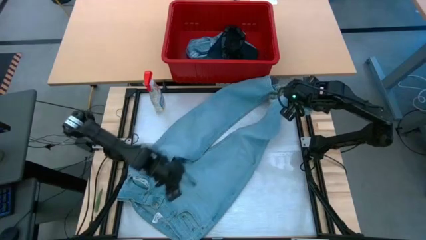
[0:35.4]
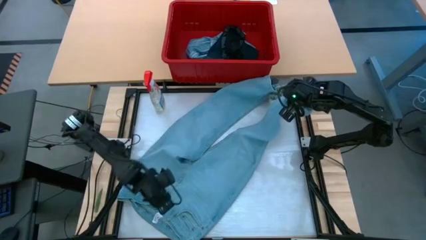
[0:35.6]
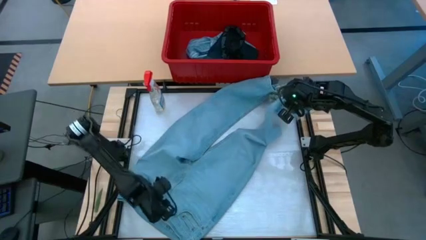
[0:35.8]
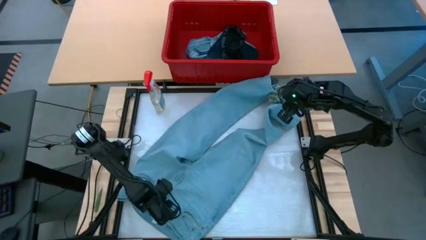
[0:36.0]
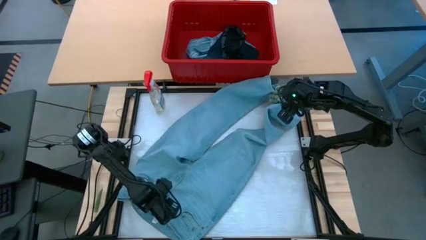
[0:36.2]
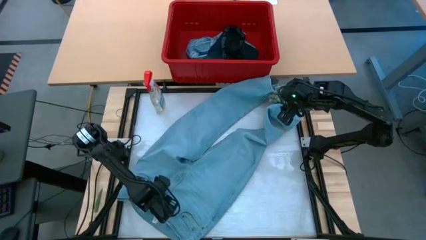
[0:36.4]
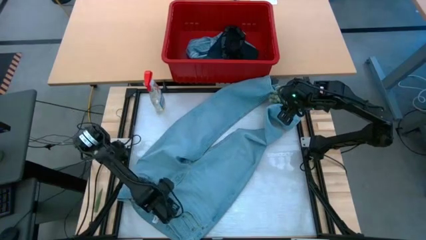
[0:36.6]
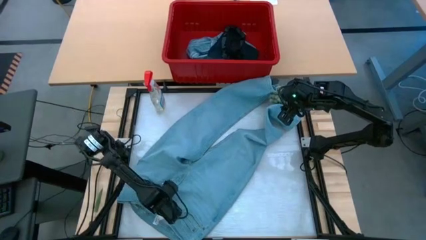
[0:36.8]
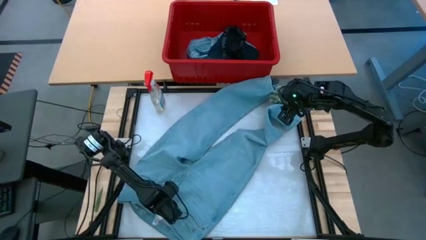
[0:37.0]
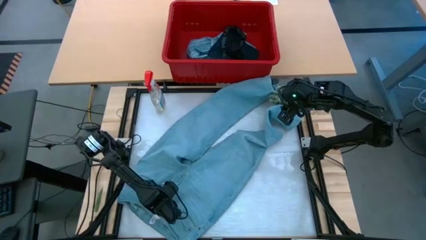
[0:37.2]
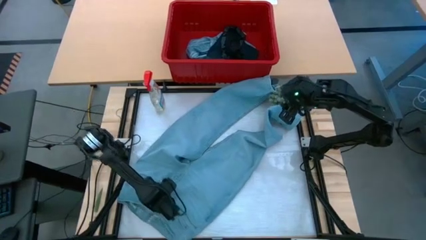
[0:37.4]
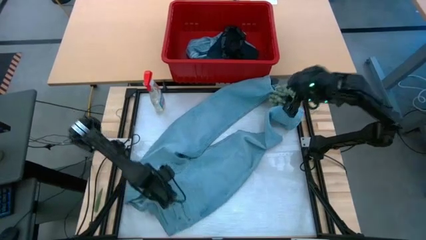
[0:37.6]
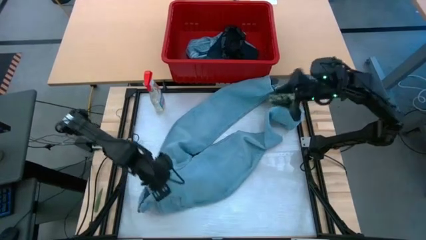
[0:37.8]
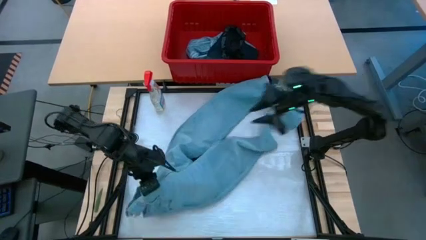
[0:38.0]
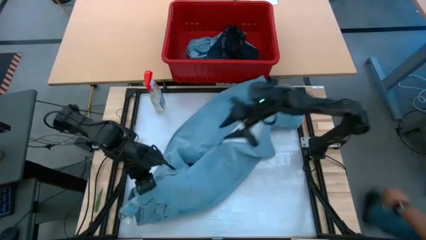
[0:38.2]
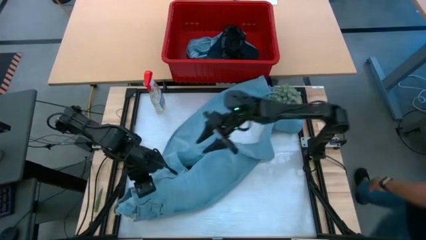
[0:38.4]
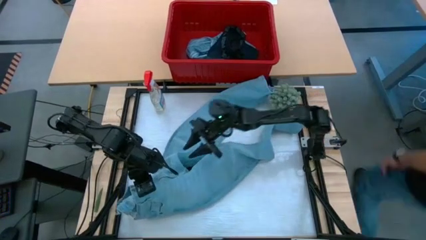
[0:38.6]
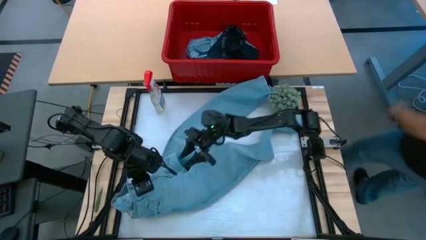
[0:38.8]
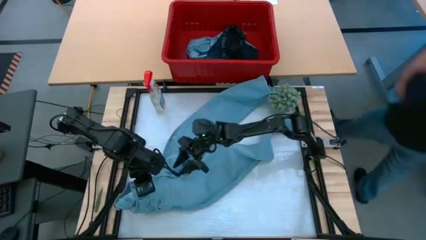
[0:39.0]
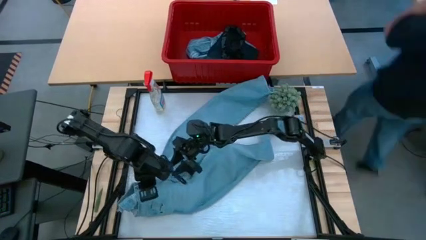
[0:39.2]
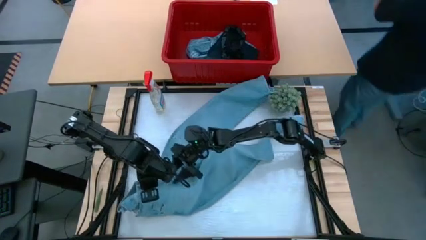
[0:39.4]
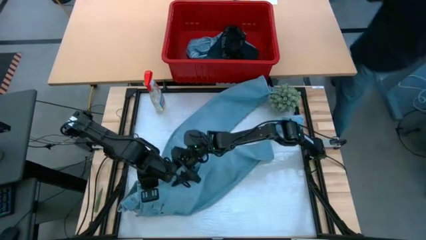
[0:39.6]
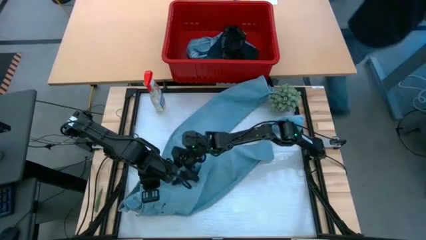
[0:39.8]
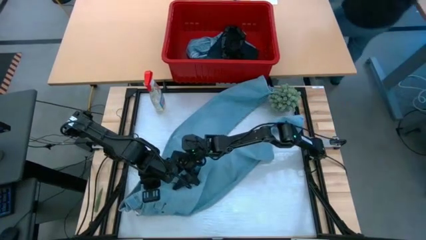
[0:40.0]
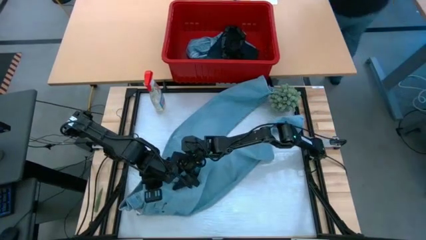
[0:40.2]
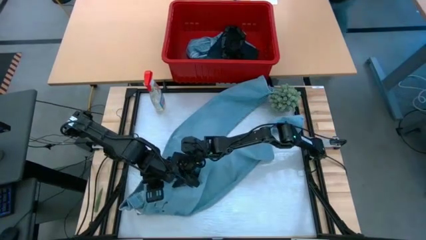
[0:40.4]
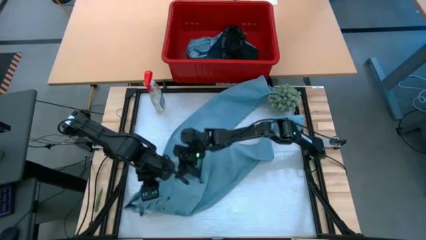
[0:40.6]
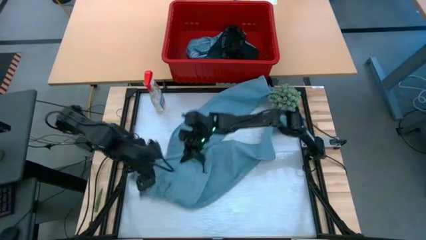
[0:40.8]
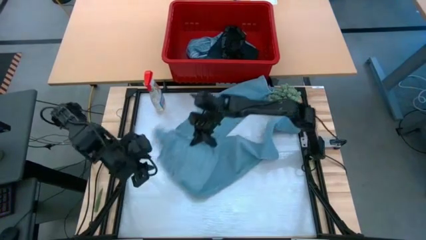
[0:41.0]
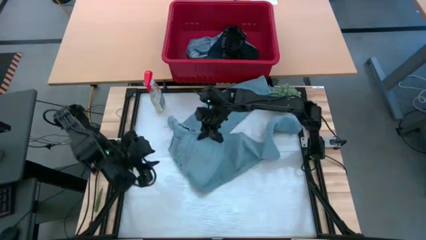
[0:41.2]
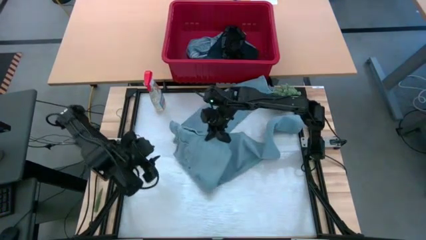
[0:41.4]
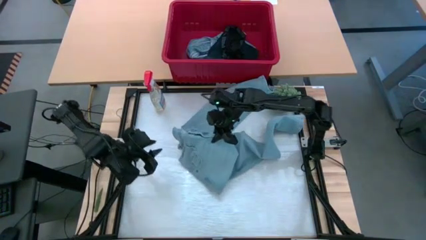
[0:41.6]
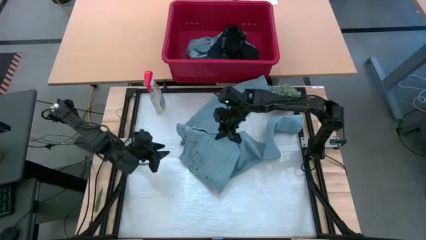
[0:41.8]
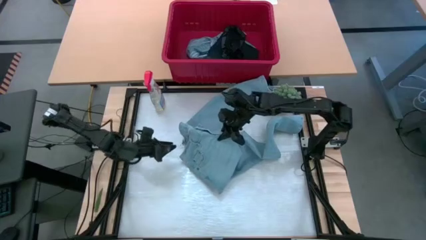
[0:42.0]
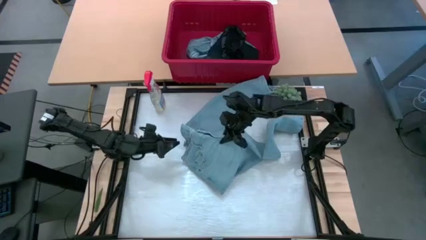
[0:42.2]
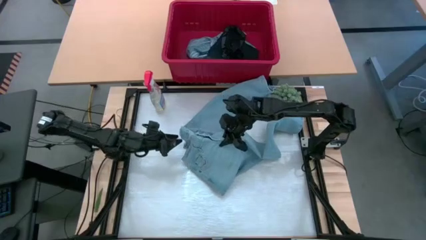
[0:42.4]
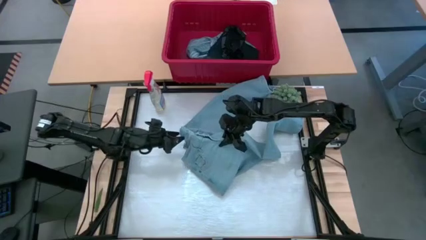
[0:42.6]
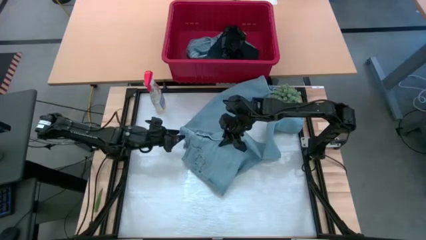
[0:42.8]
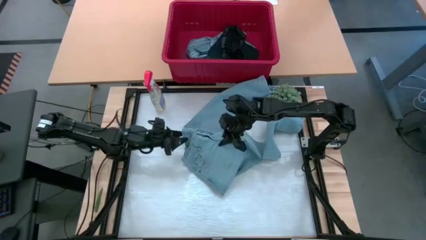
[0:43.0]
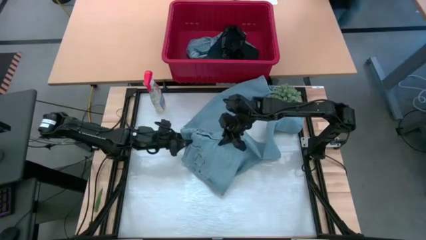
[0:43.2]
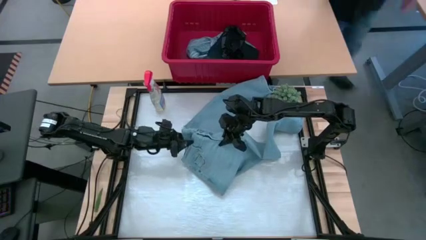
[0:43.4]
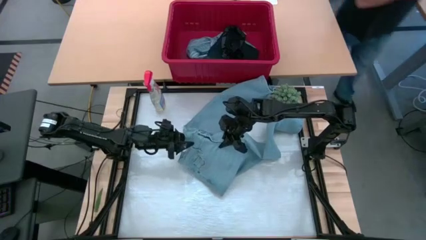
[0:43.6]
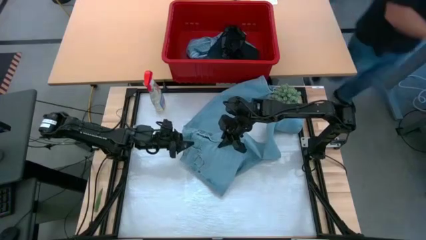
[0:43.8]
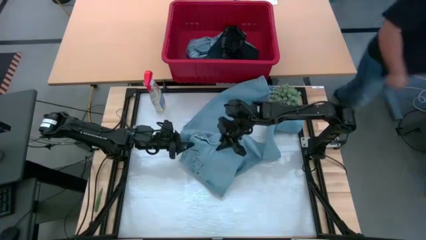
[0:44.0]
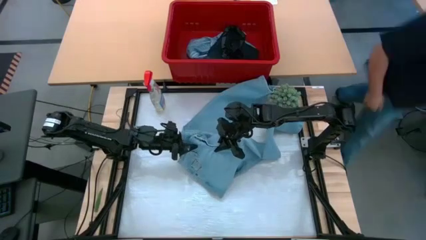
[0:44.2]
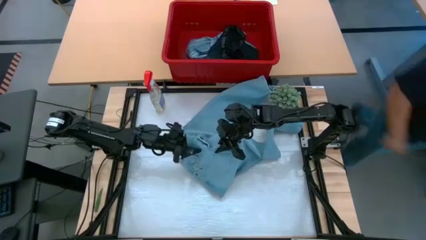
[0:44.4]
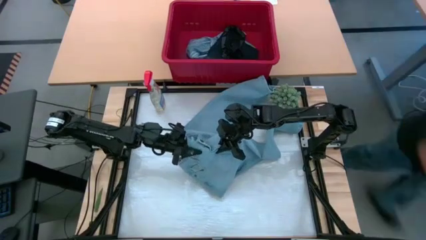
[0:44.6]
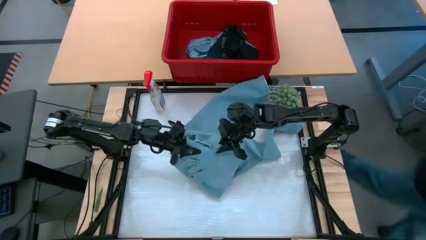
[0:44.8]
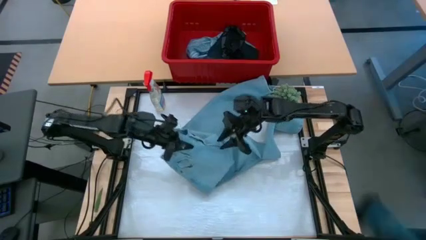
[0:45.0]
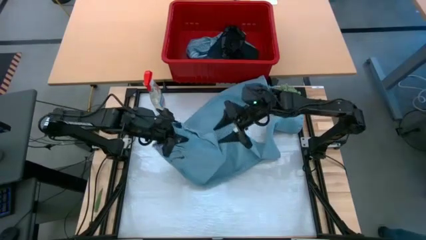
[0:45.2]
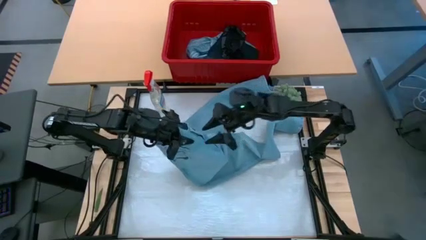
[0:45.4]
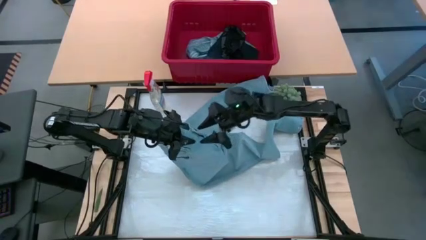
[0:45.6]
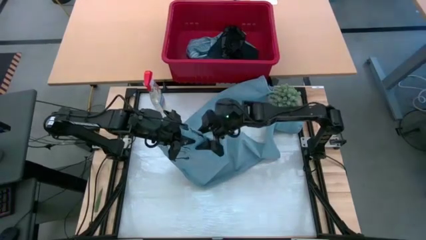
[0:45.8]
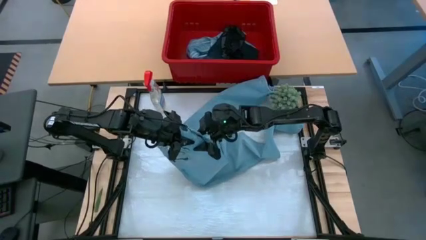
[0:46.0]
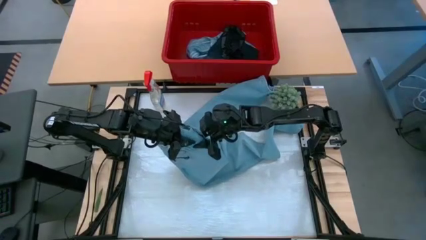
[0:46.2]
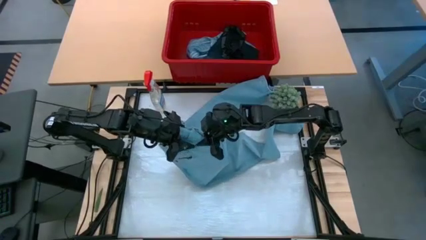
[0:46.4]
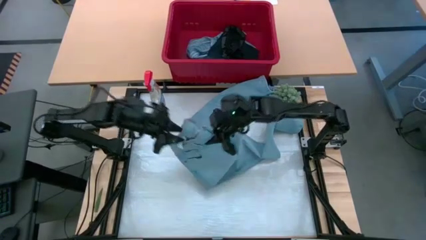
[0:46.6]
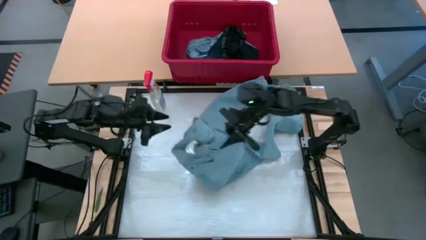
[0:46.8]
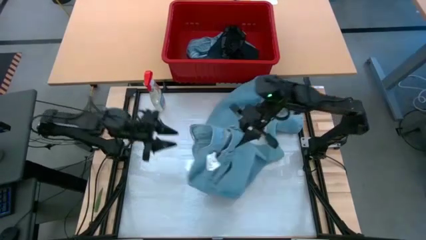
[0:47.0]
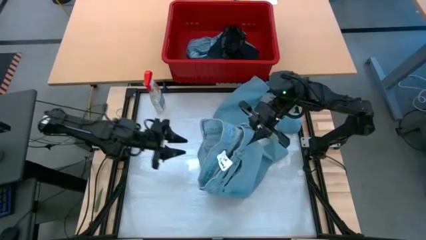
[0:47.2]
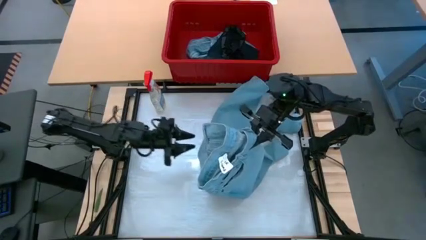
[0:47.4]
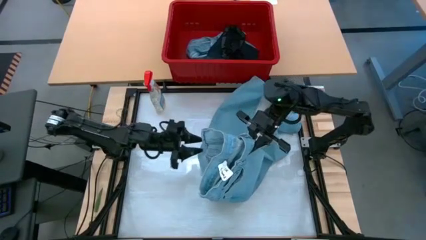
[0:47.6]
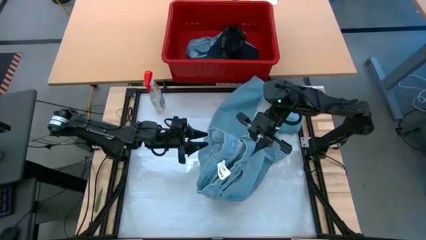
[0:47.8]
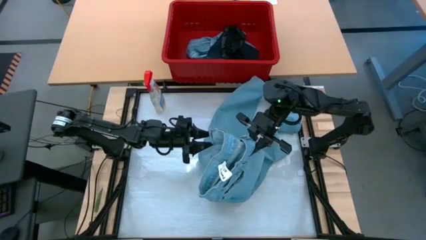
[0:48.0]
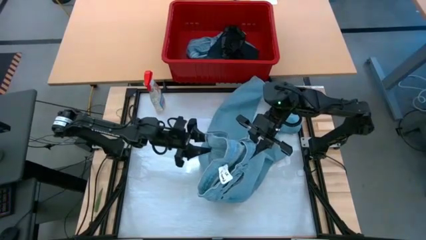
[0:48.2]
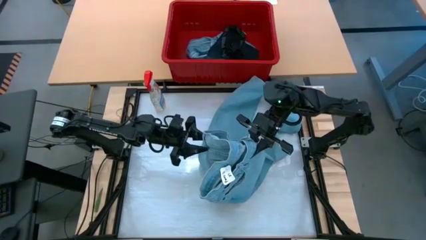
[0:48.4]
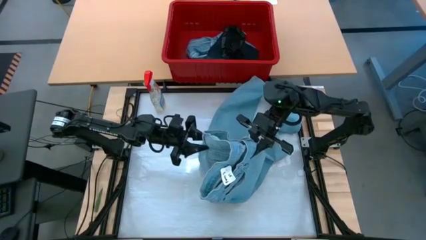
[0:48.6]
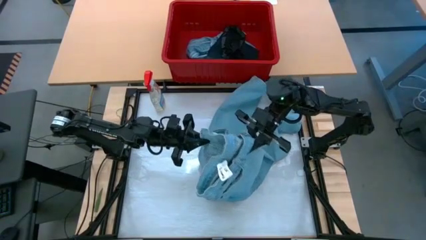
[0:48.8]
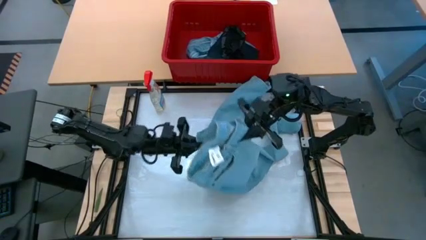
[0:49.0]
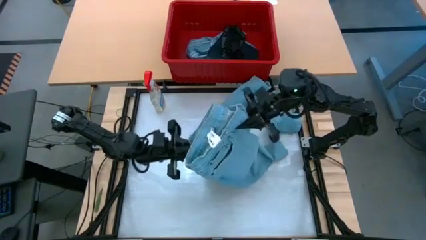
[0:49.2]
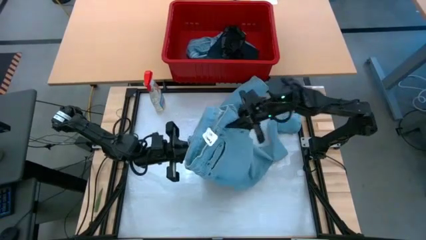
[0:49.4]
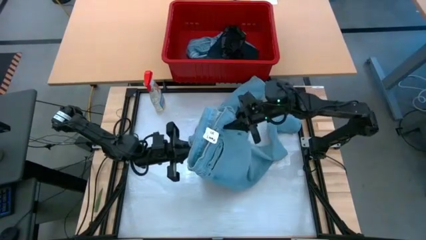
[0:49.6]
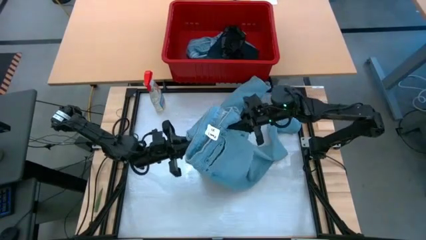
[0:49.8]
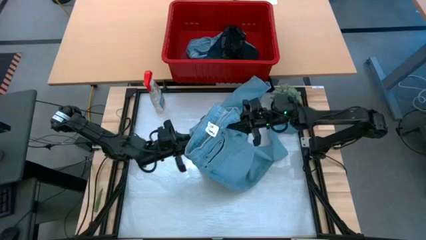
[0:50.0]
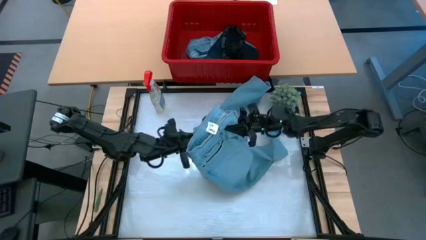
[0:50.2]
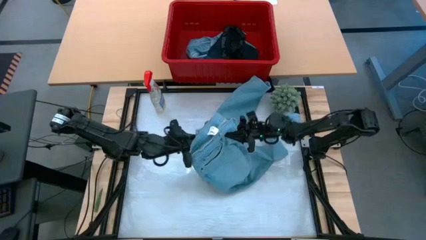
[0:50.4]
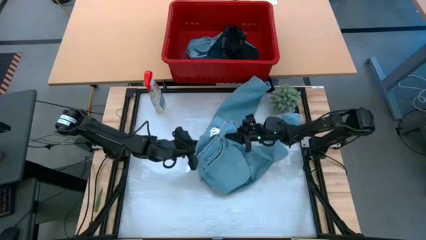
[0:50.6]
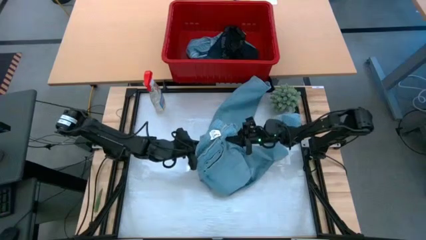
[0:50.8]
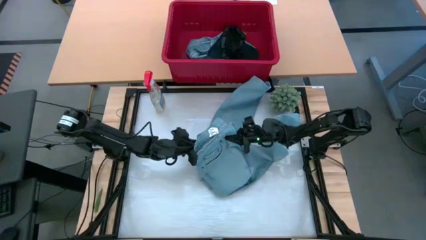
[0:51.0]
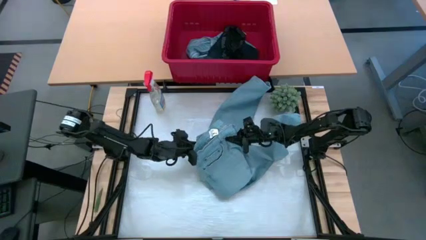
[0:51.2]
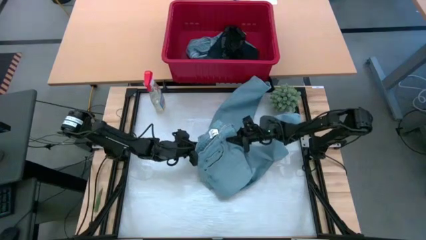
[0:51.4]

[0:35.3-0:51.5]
Task: Fold Laundry from Bin
Fold the blue pants from the red laundry bin
